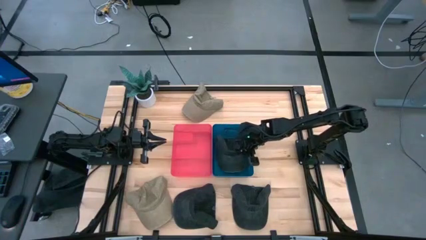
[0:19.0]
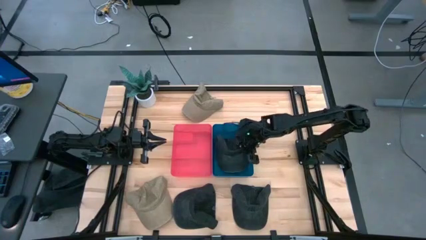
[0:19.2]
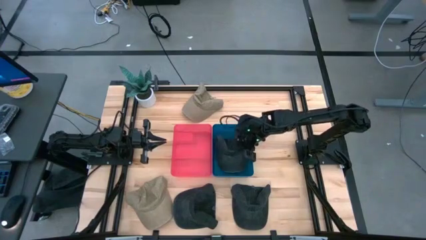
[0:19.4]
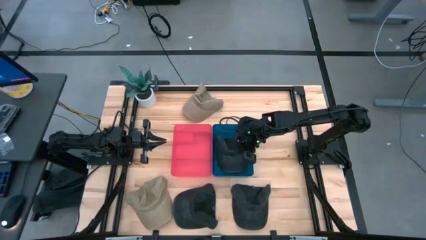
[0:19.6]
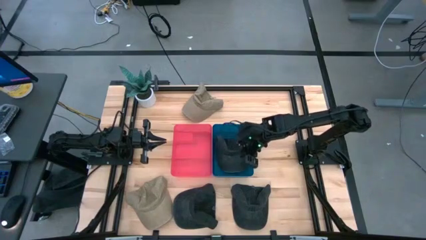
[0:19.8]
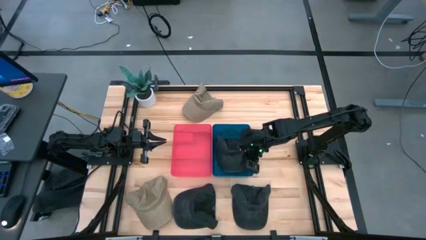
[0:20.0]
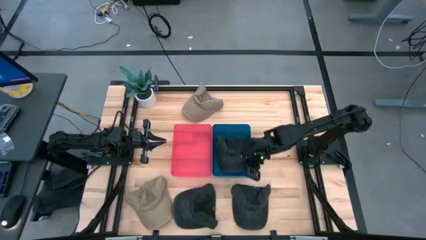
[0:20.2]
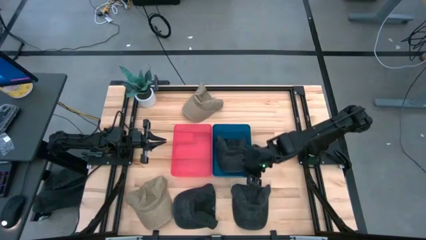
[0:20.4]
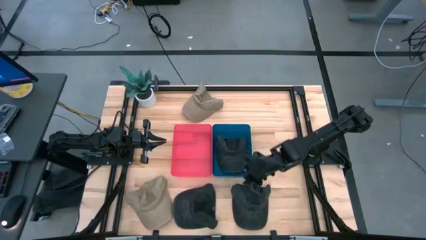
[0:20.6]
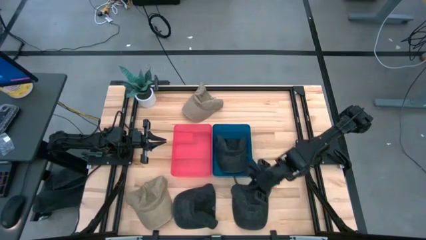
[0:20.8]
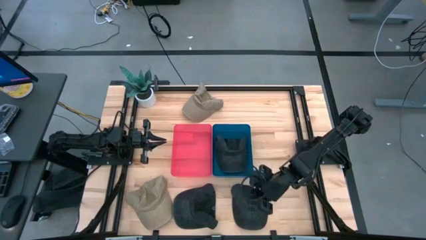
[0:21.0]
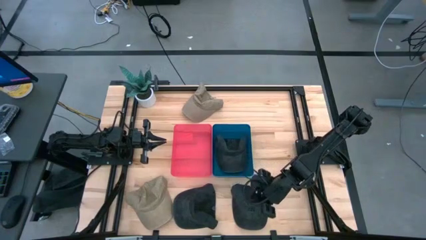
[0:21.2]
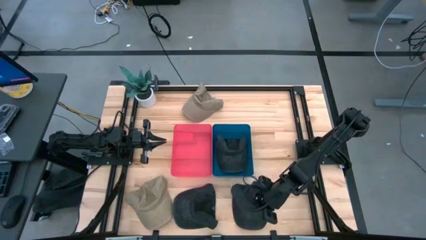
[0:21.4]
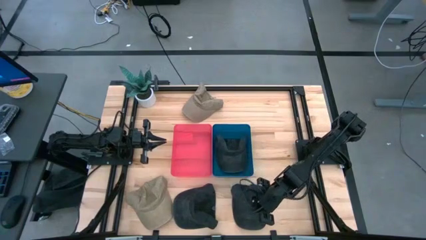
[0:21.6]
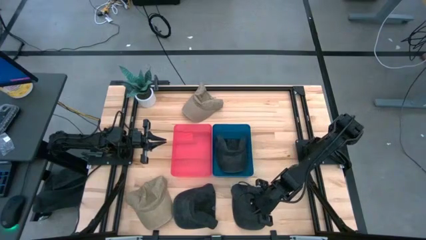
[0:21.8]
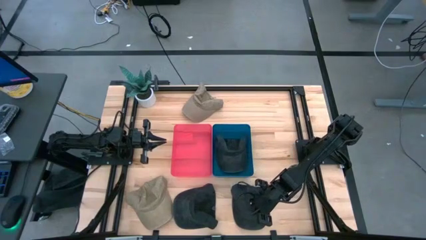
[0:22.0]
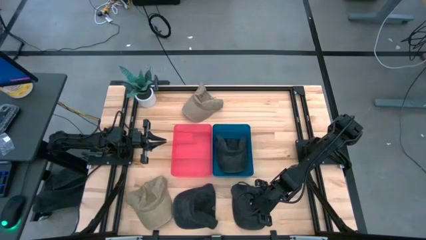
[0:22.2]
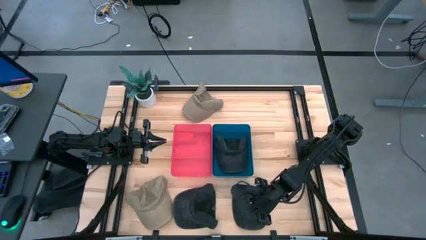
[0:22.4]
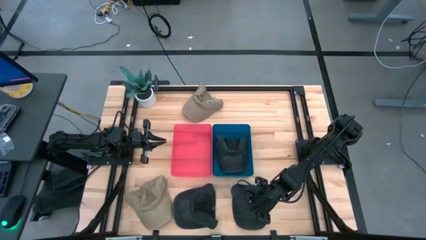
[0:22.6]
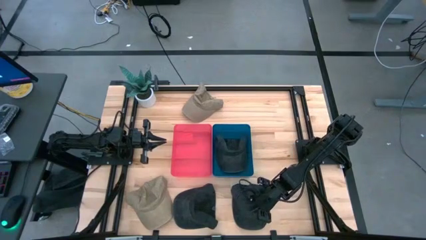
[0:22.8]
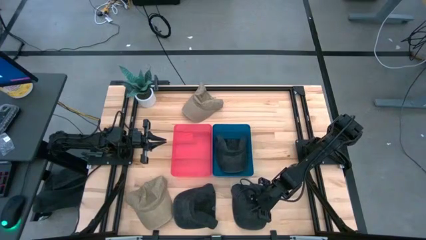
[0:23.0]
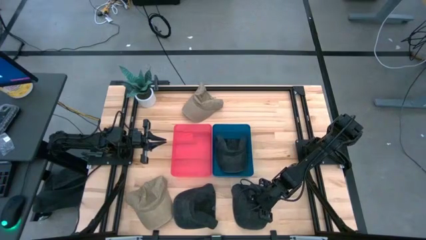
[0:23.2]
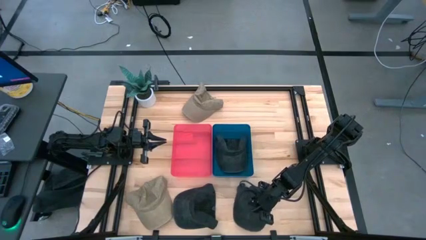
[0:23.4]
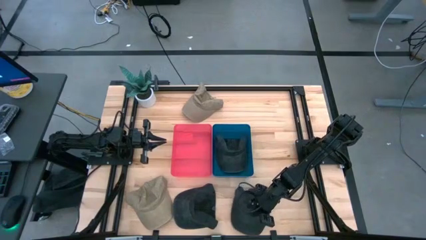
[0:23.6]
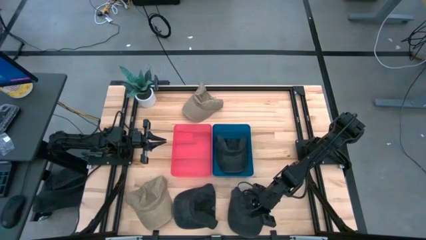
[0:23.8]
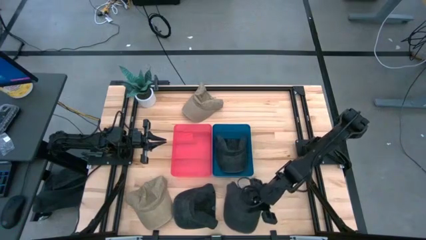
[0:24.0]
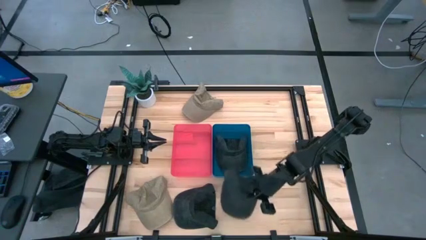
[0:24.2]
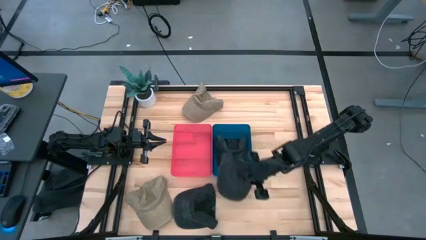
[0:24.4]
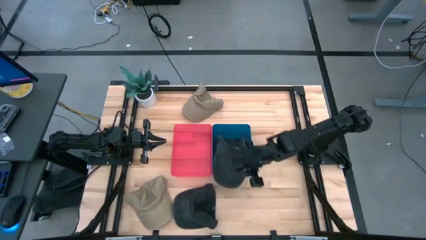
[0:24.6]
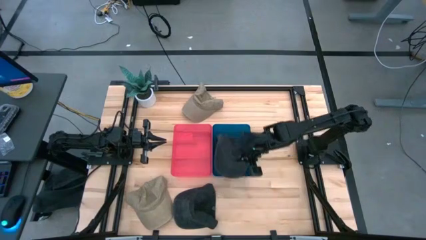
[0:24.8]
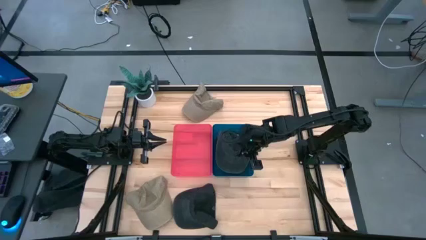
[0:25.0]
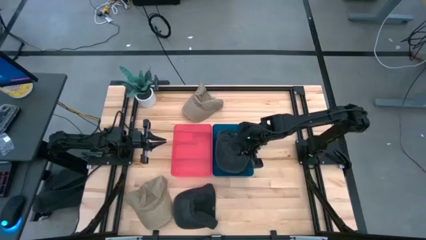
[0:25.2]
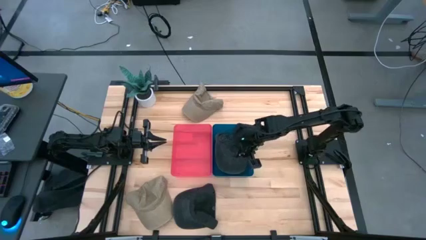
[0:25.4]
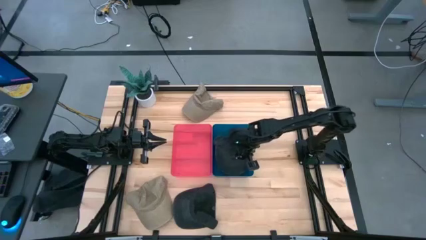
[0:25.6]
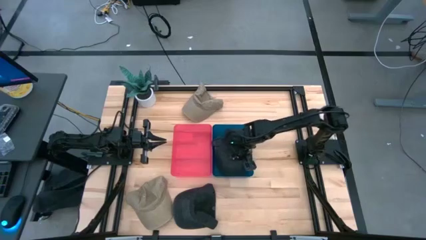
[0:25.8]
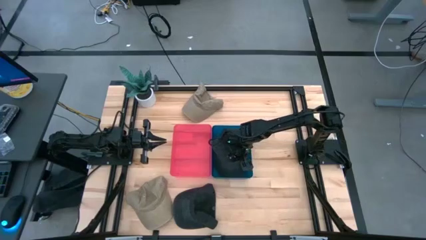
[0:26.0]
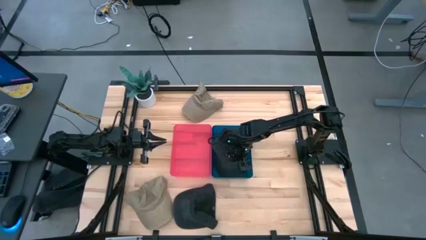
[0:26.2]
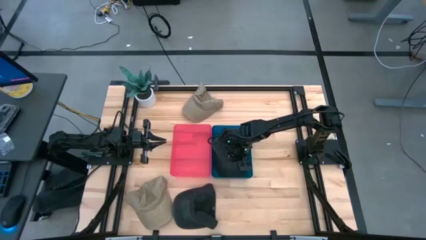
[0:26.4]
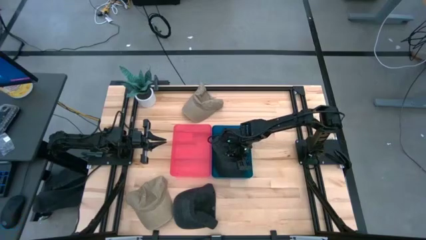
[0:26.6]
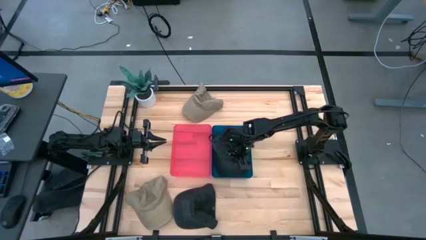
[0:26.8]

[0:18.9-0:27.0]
Task: Pick & Place hat
Put the right gray cap into the blue bin

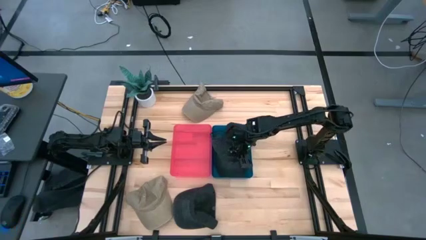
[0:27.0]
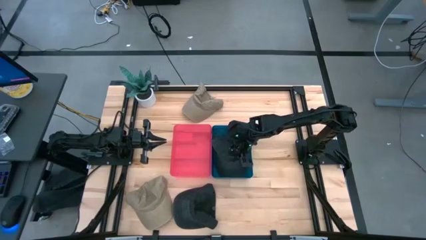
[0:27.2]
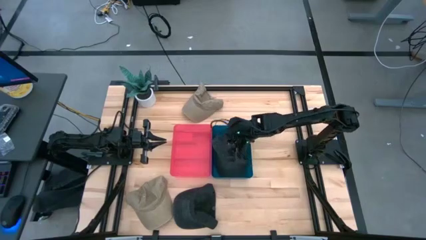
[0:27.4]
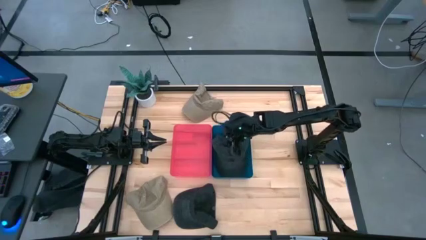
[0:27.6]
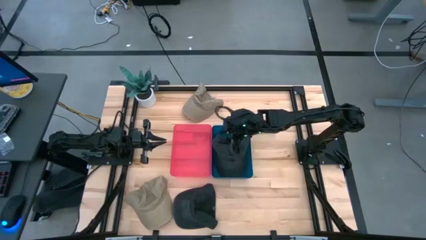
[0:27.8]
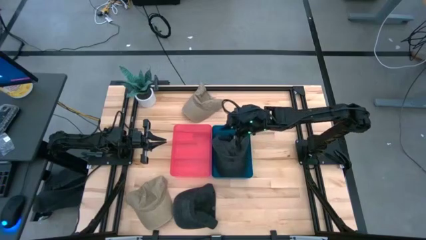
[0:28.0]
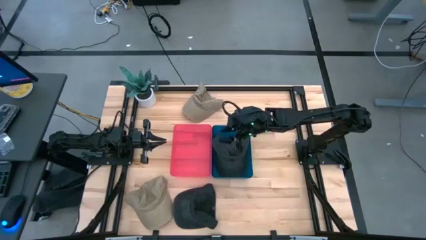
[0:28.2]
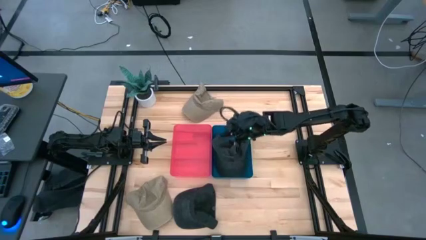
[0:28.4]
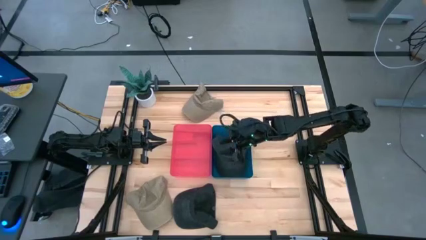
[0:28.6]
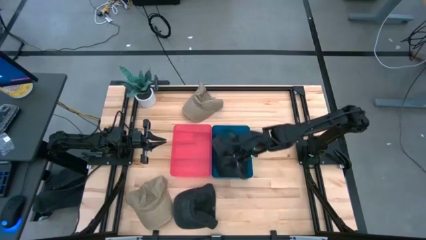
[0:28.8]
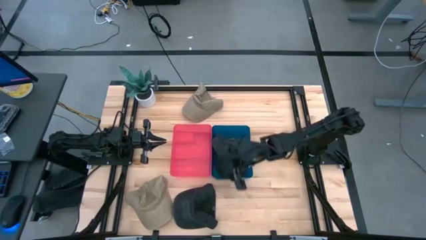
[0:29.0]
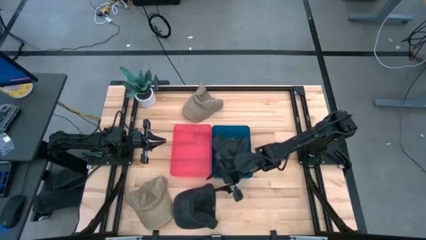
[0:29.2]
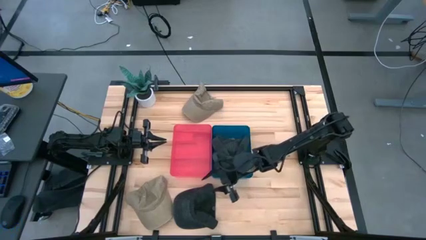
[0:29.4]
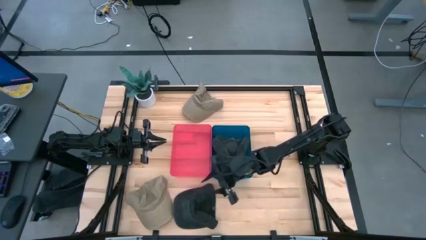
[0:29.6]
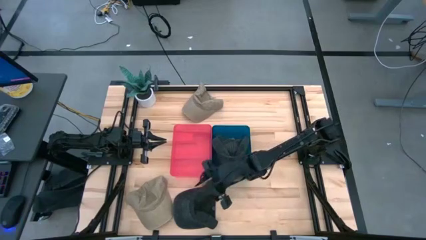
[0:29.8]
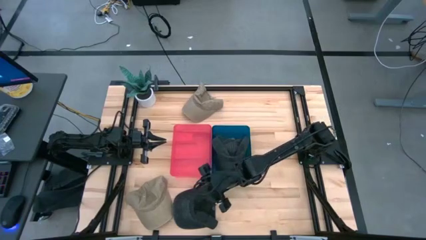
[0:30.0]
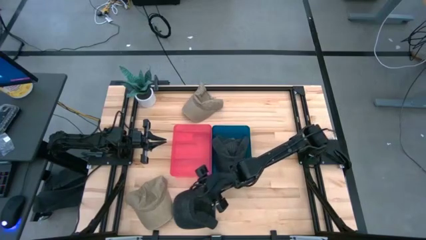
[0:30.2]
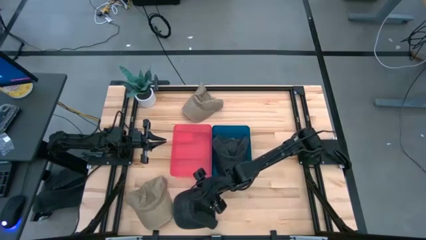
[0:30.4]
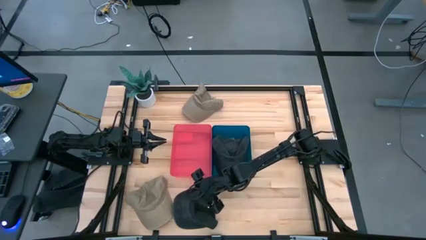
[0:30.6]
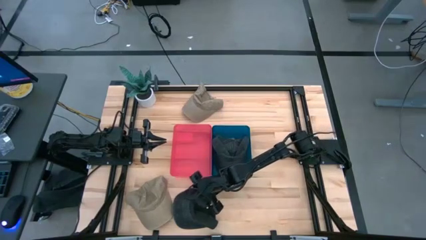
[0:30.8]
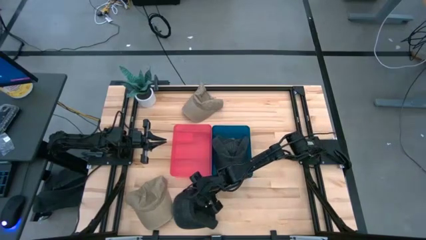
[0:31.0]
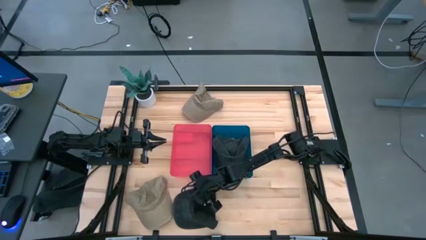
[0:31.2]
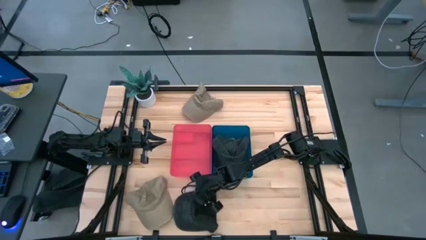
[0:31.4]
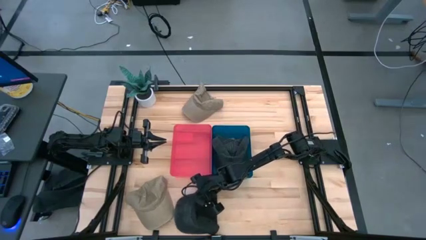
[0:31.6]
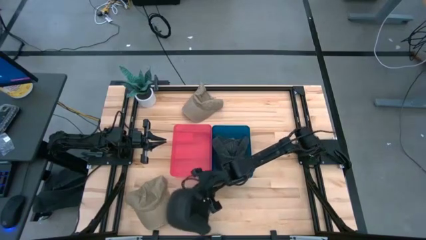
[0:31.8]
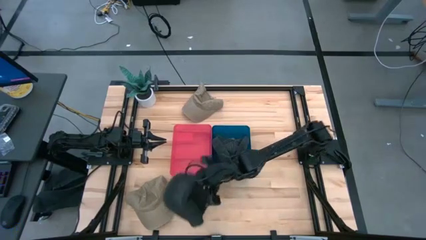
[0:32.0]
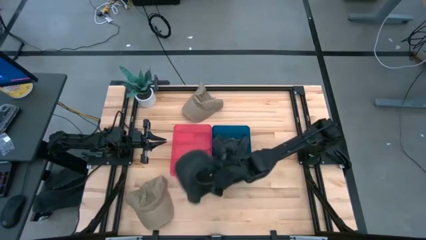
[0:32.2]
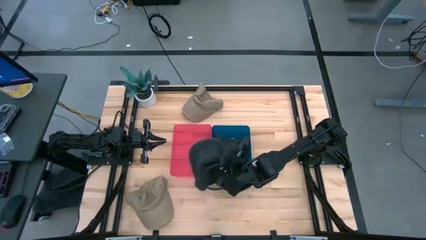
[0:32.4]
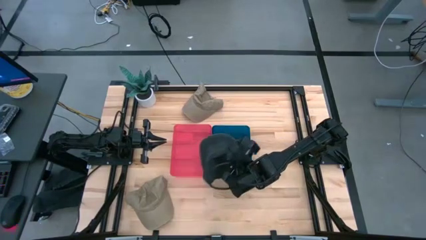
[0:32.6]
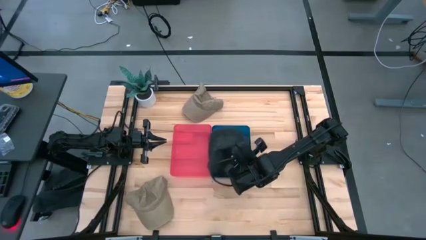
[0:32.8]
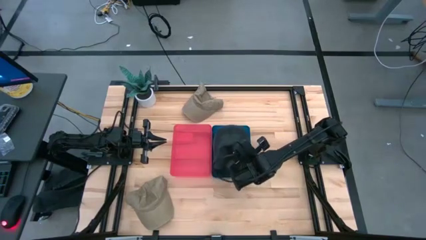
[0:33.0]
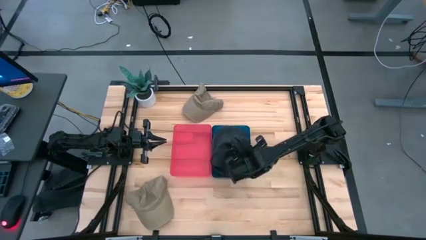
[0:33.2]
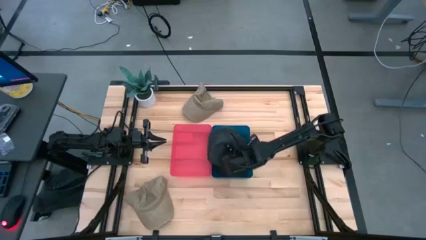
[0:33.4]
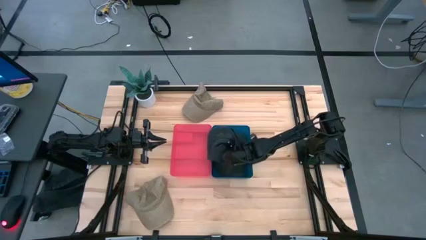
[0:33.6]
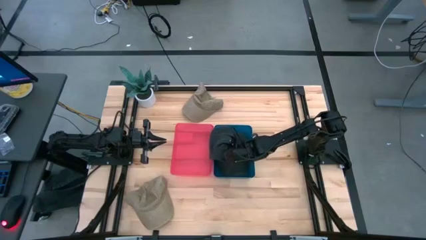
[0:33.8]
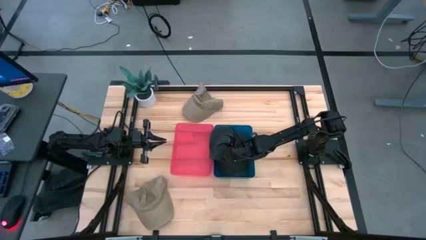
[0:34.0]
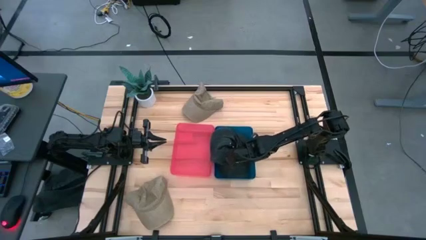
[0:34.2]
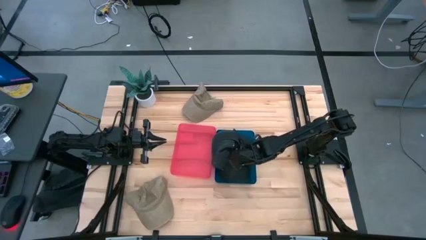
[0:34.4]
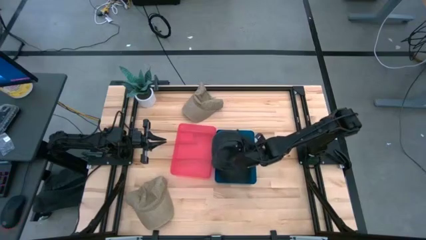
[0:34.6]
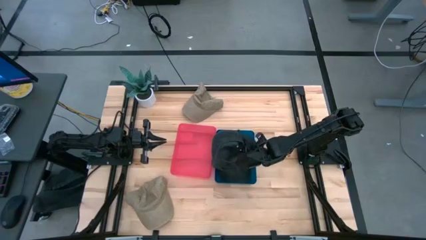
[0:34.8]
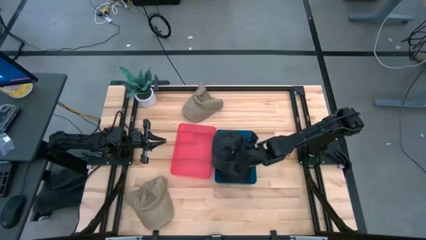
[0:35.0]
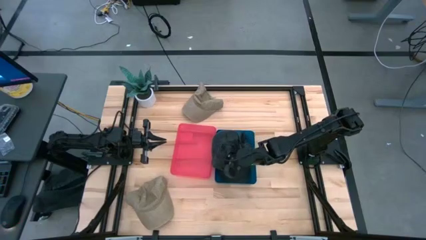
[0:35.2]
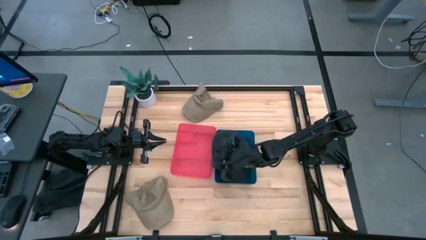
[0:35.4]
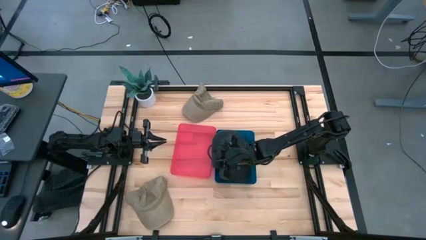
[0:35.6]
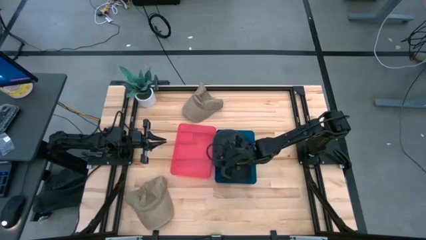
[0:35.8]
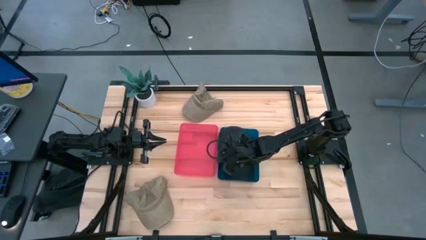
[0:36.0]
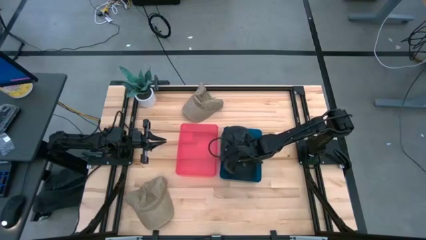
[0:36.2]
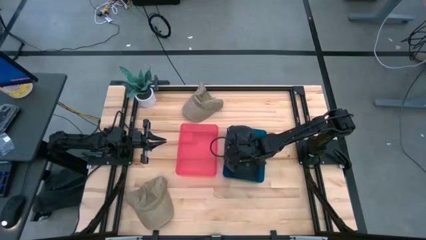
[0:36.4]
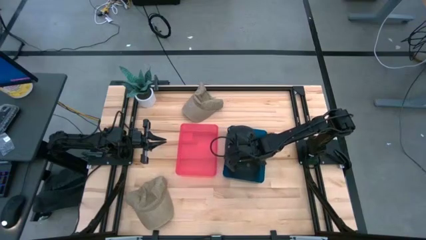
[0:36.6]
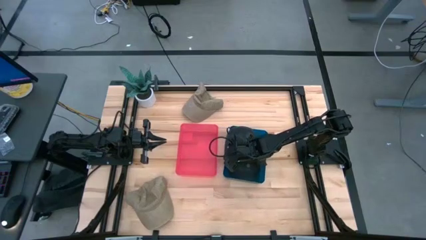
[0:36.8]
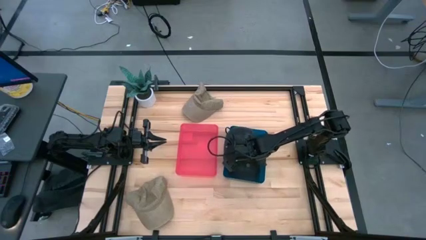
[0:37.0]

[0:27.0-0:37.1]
Put the gray cap into the blue bin
